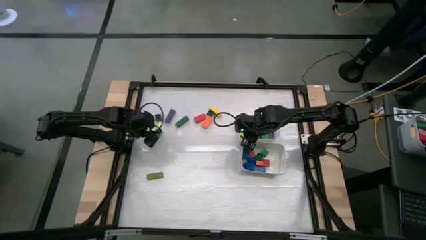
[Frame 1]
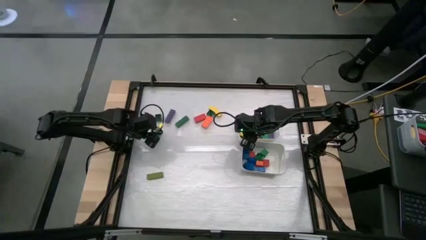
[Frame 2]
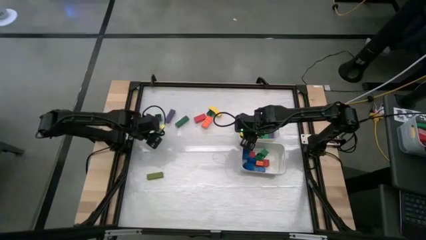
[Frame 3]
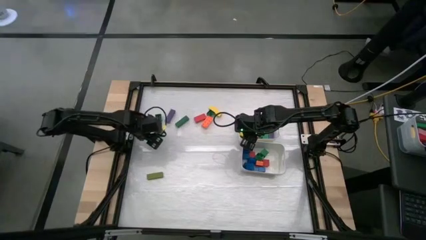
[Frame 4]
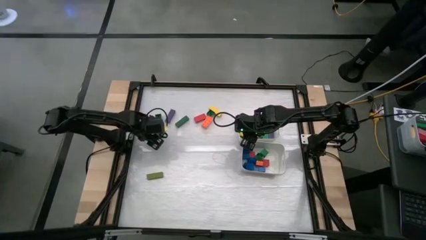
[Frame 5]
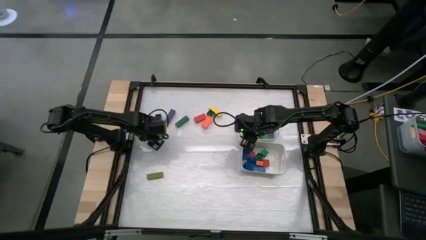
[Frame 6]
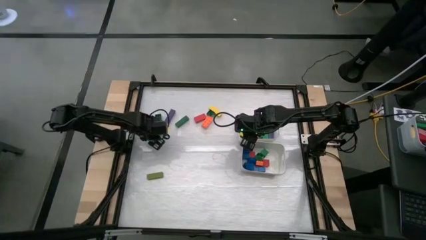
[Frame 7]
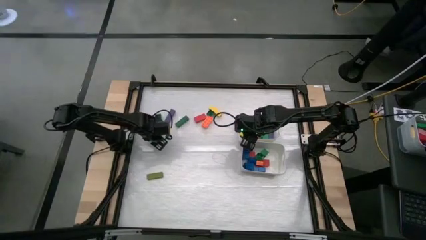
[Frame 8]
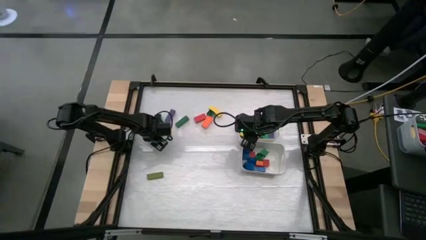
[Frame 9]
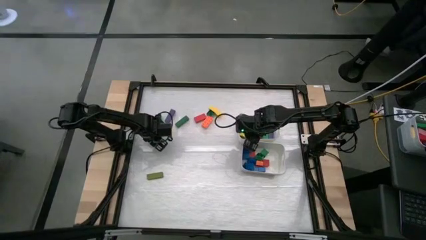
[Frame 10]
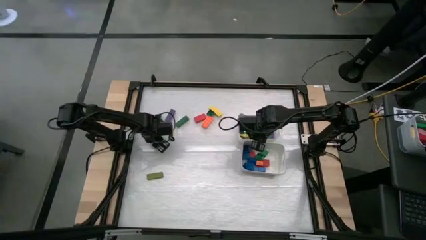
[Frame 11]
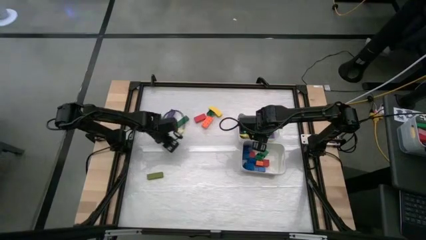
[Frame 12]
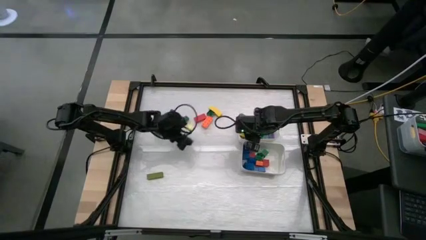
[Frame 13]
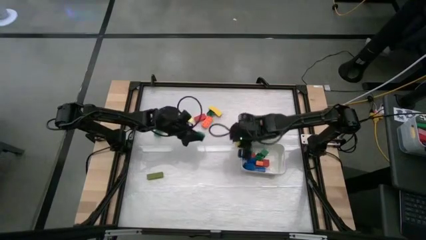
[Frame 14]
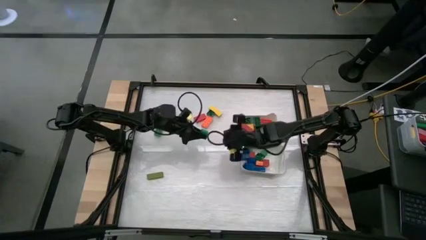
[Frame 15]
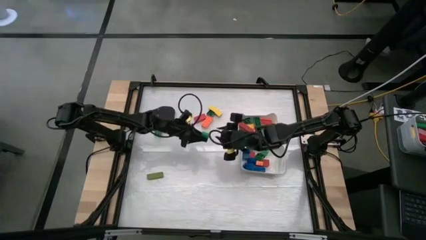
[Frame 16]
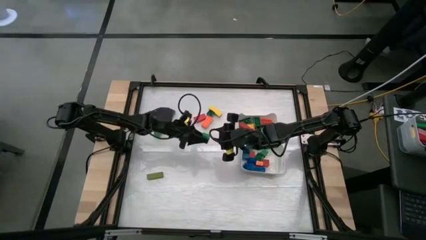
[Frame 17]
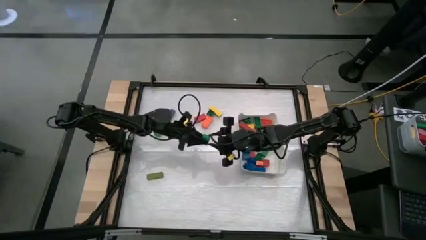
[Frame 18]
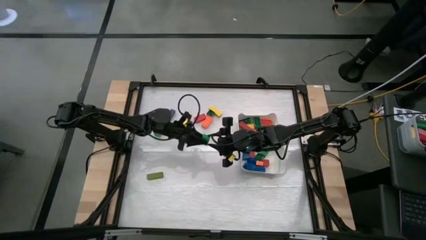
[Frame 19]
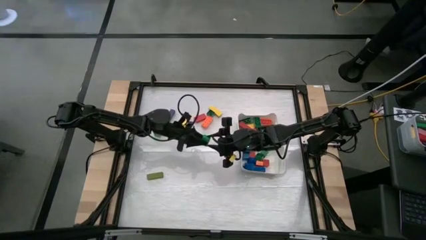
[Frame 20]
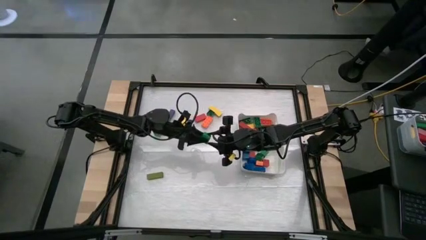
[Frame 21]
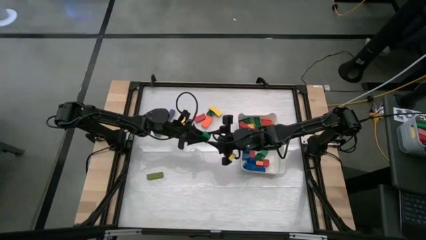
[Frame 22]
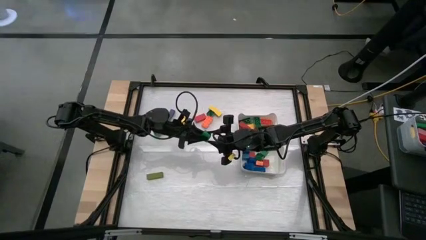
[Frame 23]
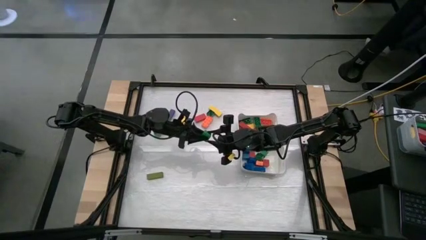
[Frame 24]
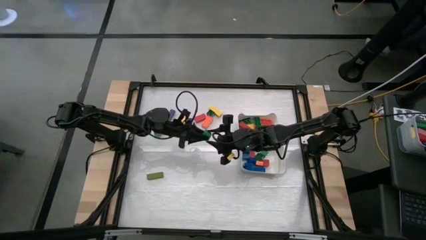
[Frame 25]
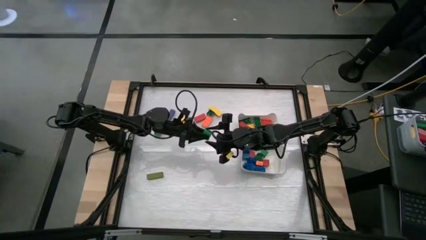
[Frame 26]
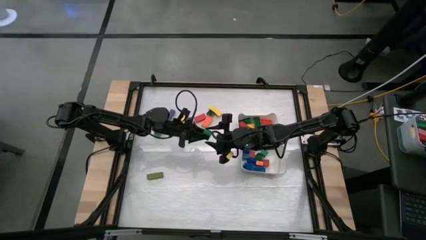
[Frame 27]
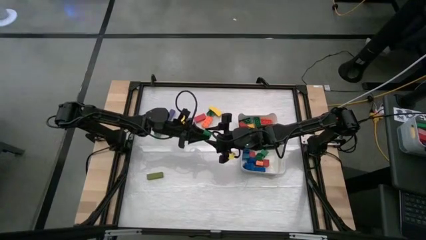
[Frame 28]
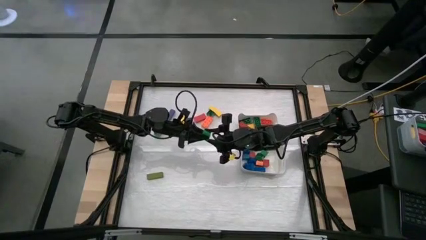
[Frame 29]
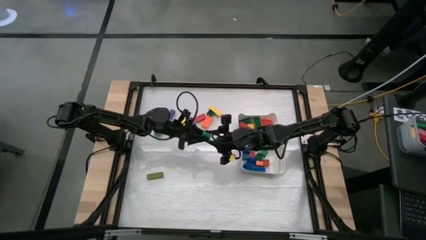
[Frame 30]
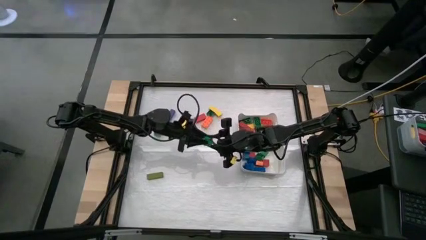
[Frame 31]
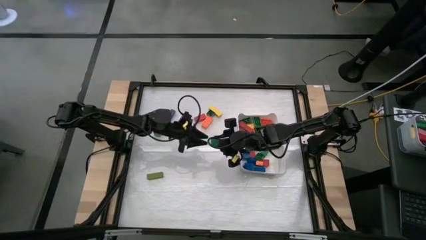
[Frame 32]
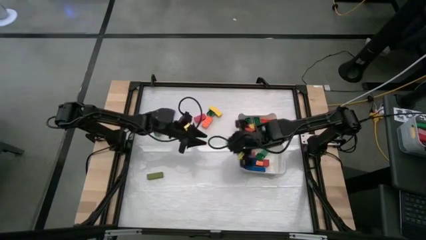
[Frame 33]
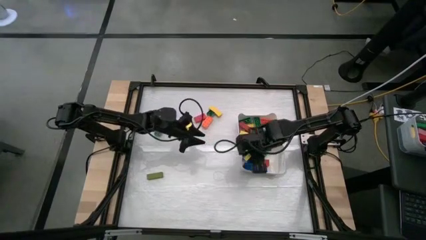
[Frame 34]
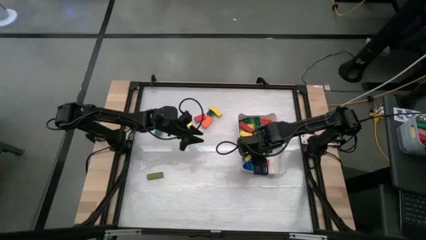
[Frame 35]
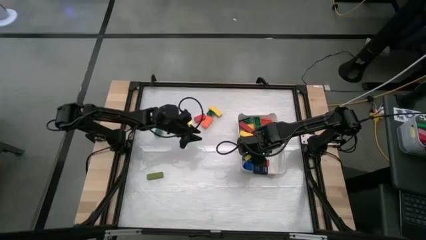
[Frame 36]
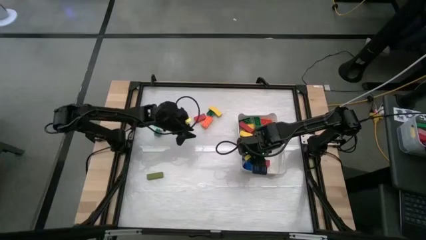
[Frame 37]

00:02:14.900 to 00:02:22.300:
Task: Sort blocks by size
Put the green cube block into the bottom white bin

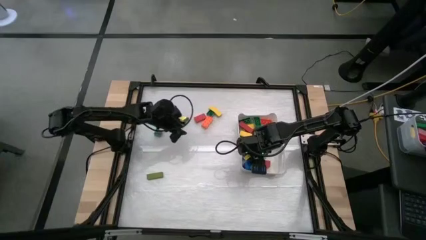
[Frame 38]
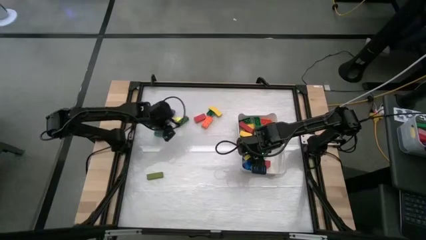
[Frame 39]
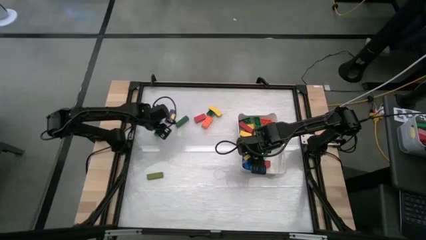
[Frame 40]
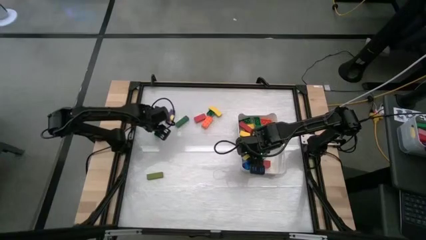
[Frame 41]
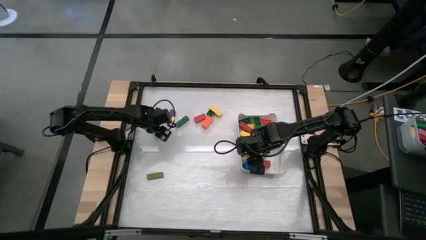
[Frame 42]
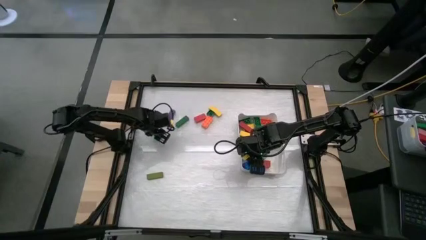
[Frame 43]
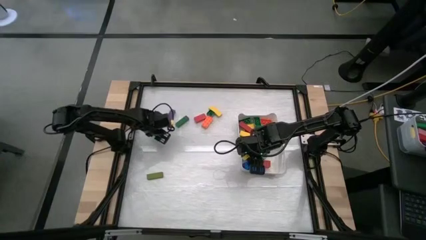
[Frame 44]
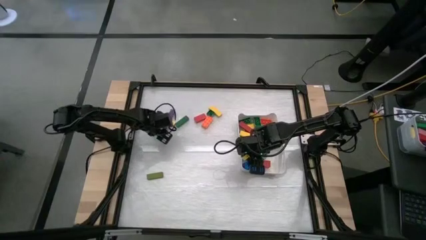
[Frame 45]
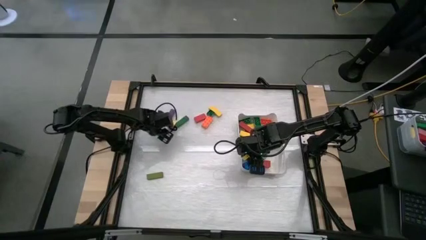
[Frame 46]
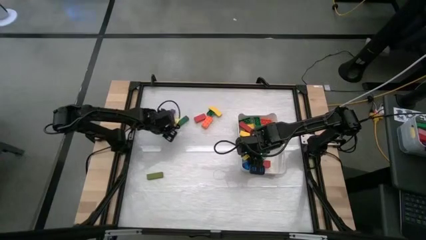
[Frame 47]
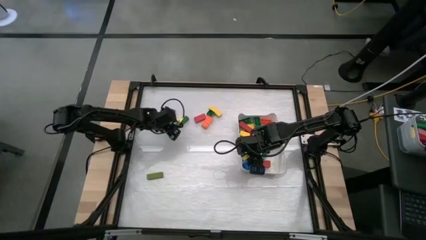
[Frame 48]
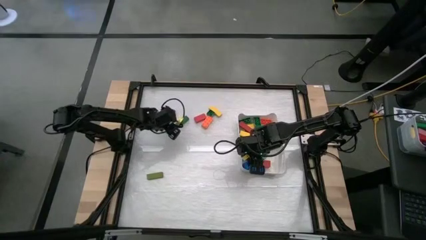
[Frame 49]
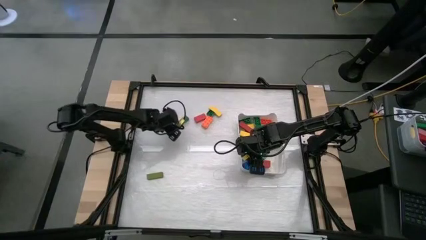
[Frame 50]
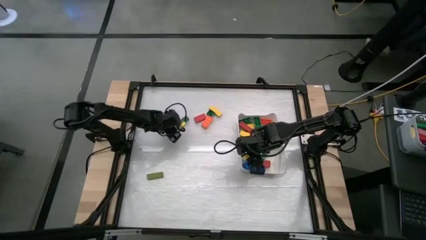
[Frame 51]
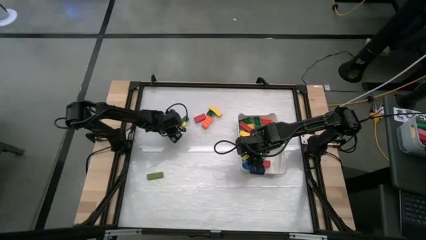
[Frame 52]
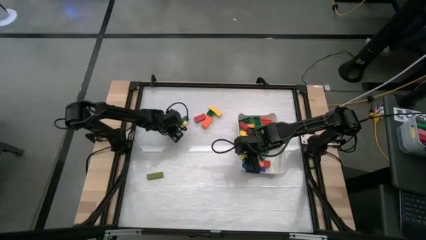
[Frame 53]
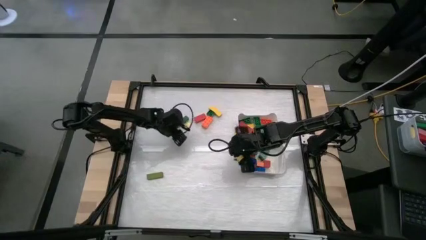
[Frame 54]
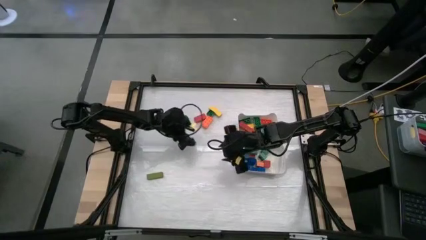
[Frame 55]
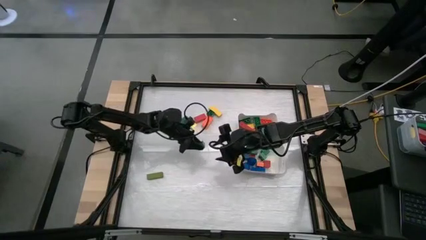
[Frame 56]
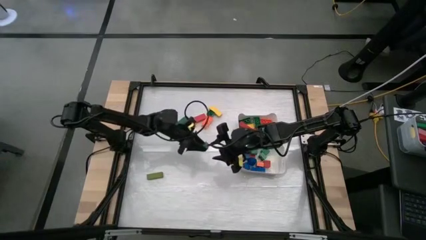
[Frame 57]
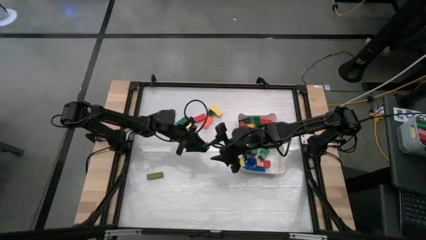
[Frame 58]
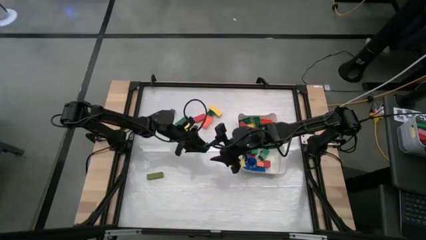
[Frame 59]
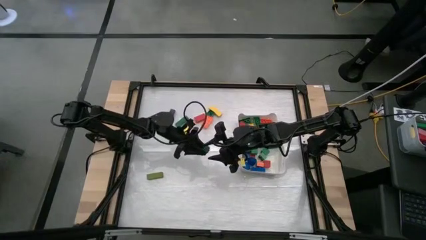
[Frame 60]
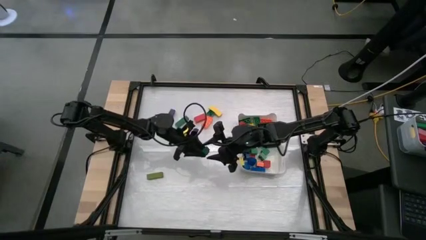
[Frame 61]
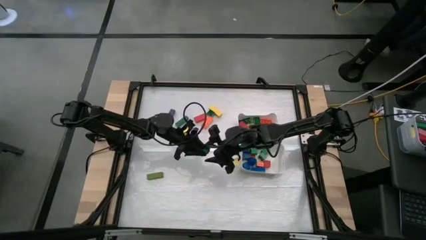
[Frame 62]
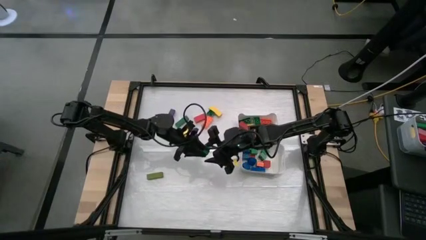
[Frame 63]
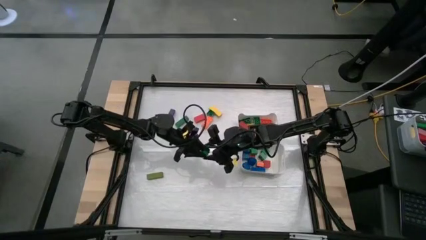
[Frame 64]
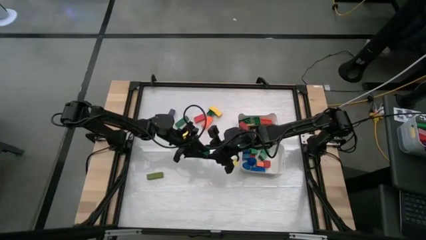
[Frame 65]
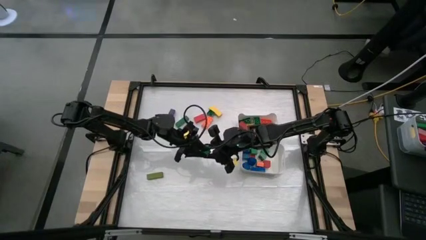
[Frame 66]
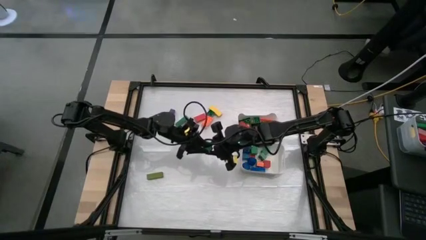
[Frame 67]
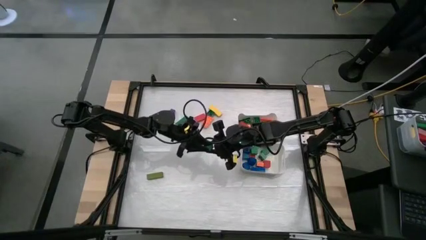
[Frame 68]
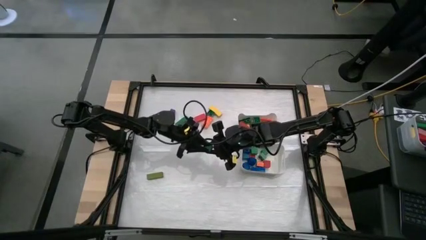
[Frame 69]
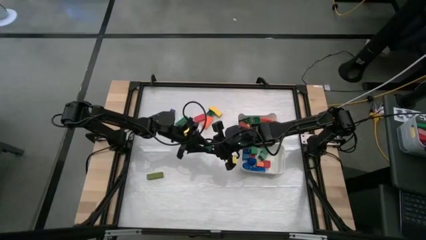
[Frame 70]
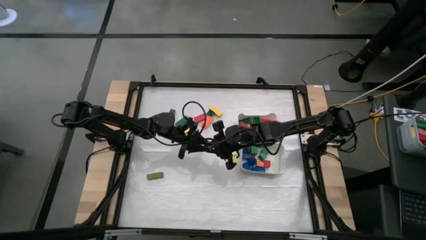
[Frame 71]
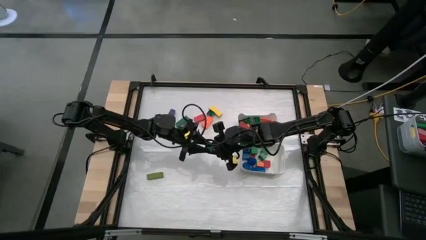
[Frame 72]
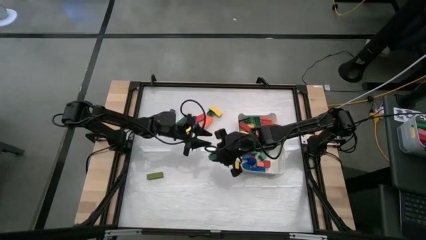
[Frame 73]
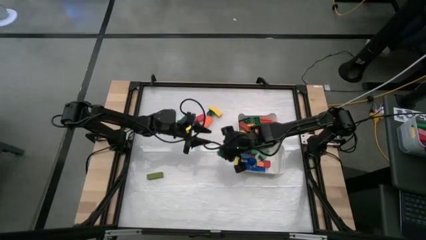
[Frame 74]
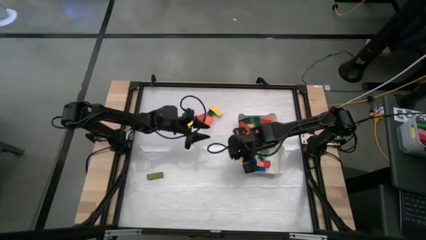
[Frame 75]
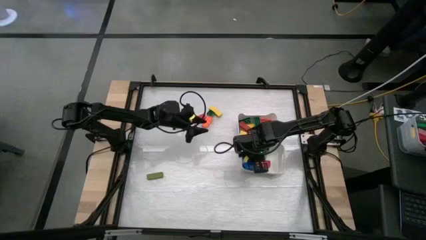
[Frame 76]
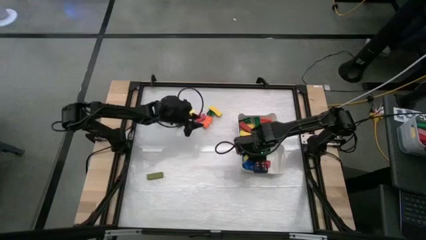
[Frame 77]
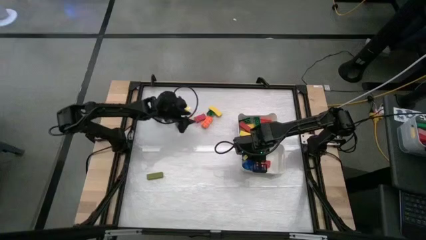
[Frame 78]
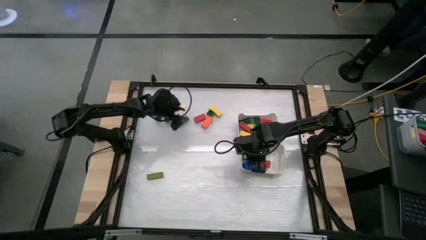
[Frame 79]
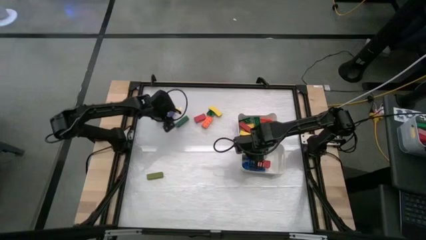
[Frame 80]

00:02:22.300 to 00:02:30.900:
Put the green cube game piece into the bottom white bin

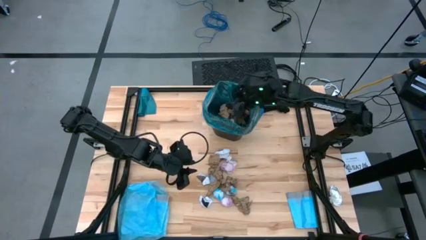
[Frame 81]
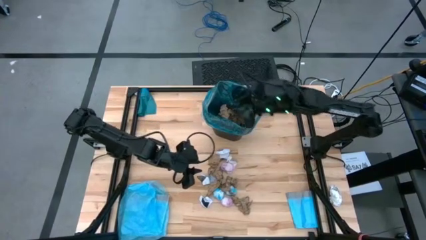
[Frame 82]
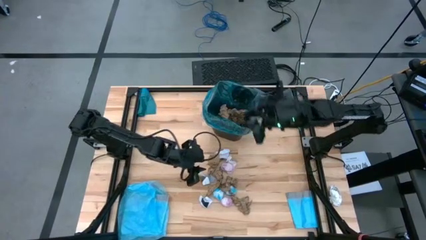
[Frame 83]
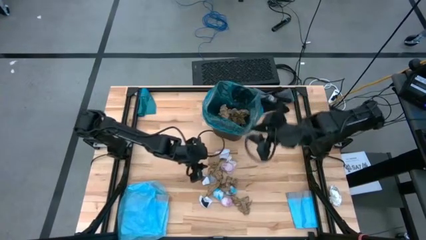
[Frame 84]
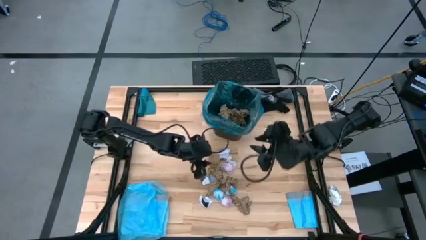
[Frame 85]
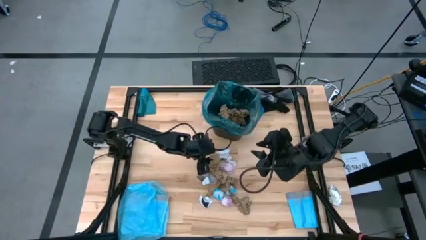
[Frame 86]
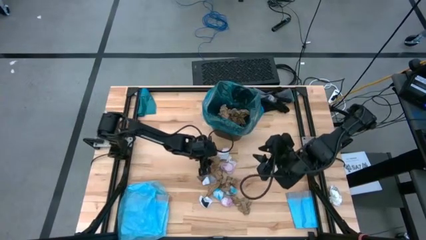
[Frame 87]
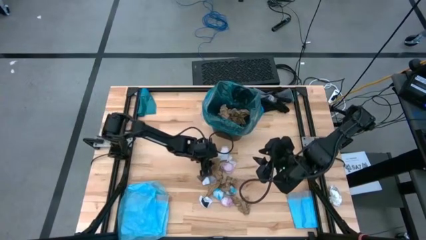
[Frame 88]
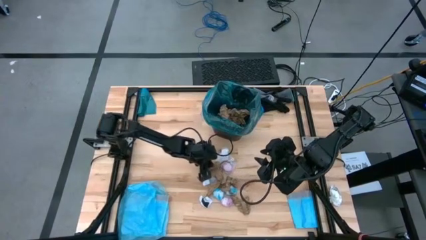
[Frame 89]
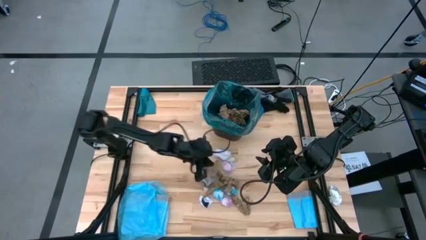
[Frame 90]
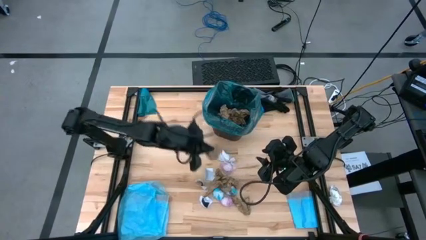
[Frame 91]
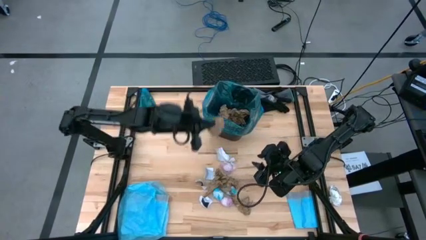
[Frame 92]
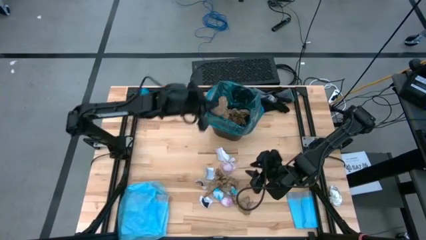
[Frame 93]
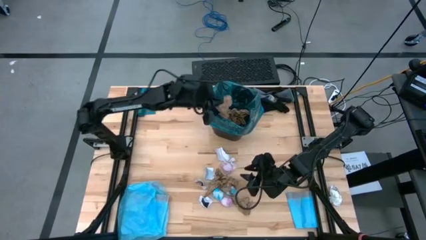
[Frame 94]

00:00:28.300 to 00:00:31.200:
Task: place trash/remove bag and relplace
Put the brown napkin into the blue trash bag inside the black trash bin
